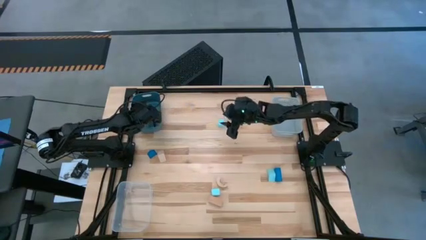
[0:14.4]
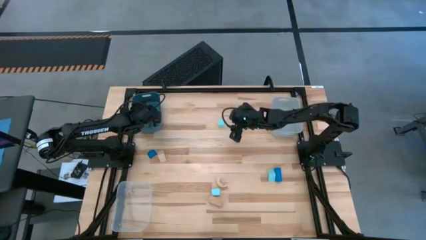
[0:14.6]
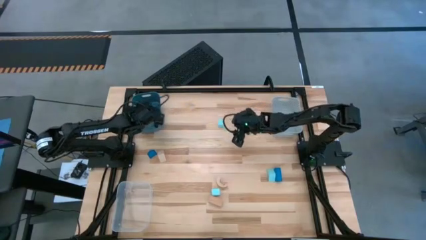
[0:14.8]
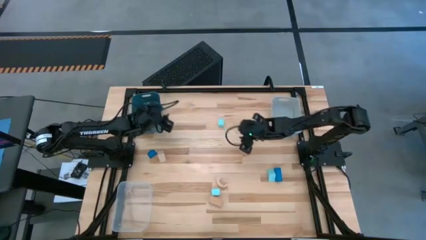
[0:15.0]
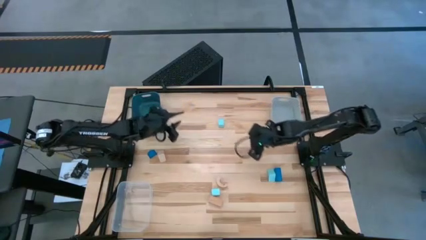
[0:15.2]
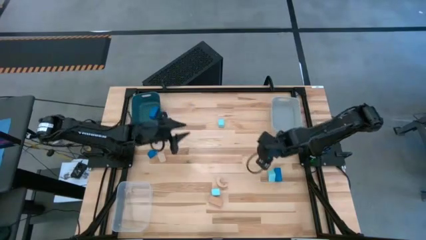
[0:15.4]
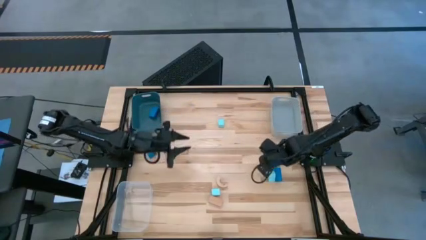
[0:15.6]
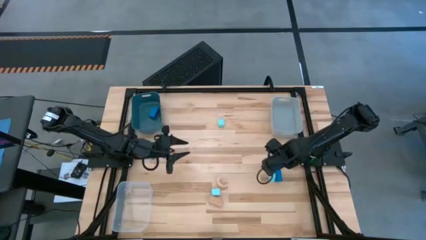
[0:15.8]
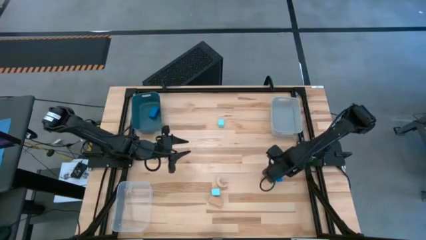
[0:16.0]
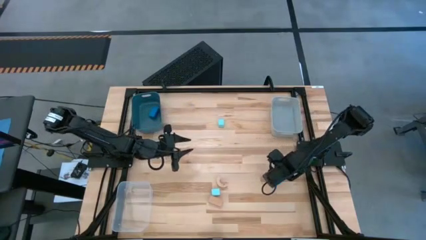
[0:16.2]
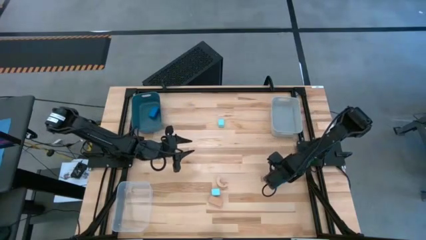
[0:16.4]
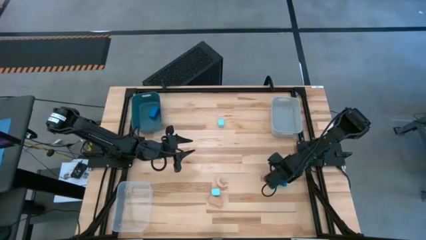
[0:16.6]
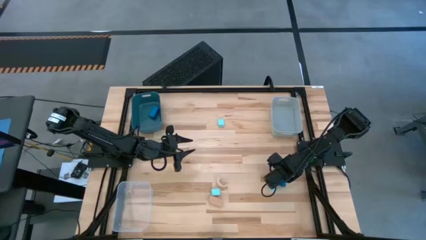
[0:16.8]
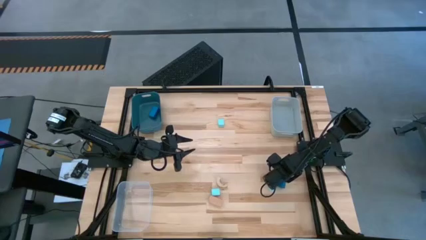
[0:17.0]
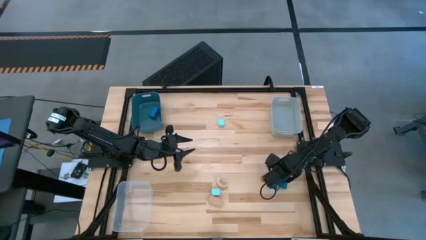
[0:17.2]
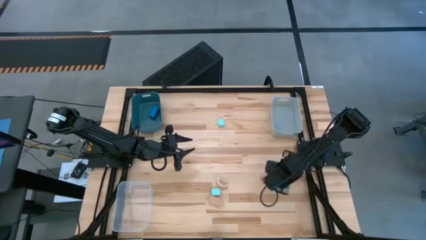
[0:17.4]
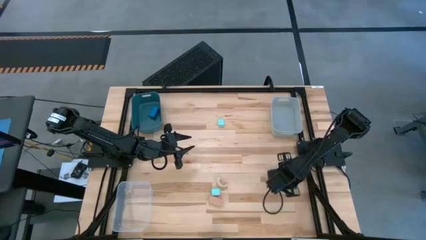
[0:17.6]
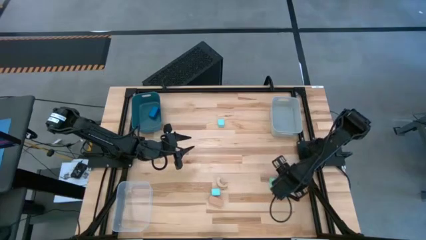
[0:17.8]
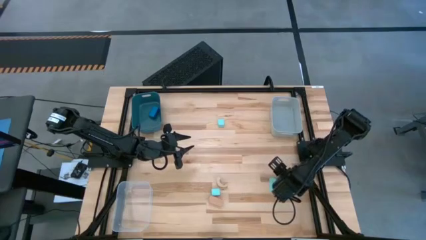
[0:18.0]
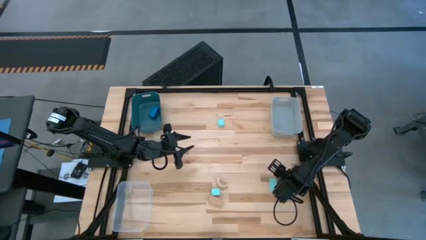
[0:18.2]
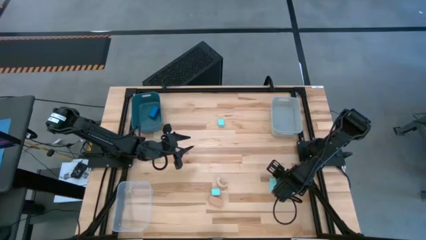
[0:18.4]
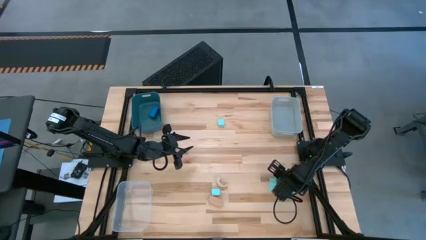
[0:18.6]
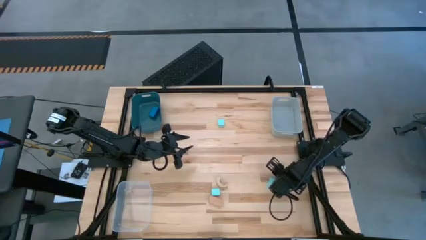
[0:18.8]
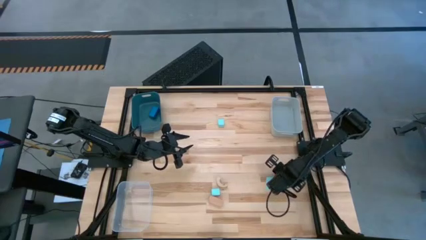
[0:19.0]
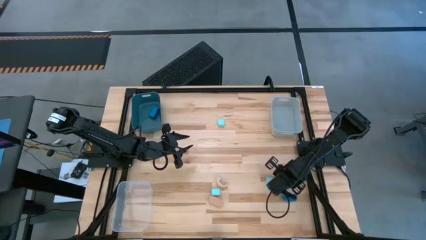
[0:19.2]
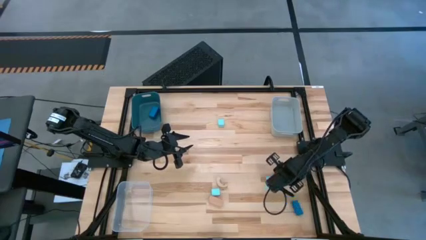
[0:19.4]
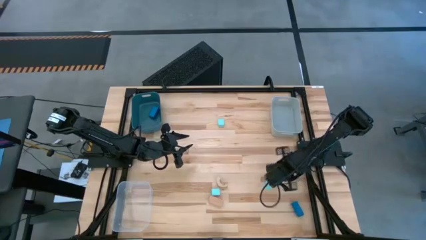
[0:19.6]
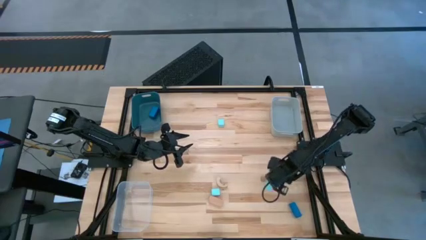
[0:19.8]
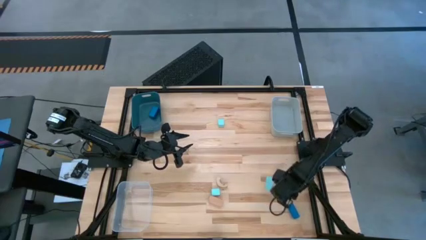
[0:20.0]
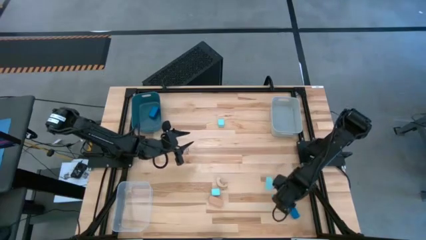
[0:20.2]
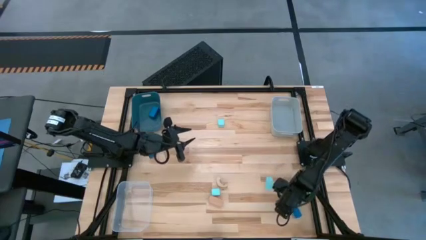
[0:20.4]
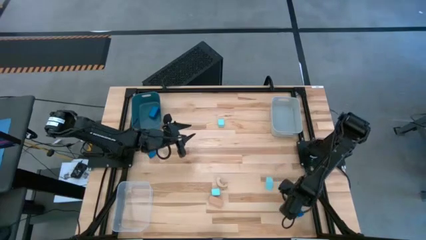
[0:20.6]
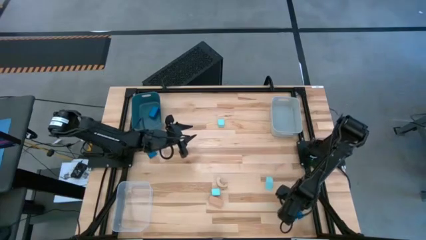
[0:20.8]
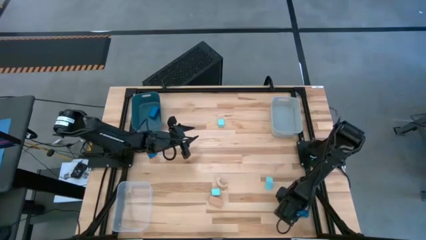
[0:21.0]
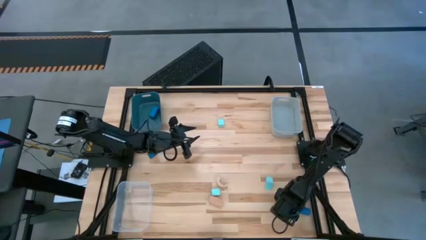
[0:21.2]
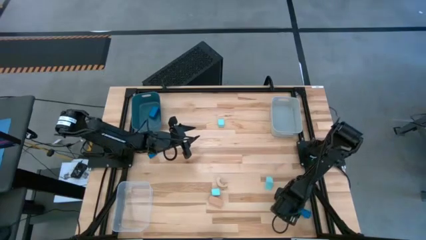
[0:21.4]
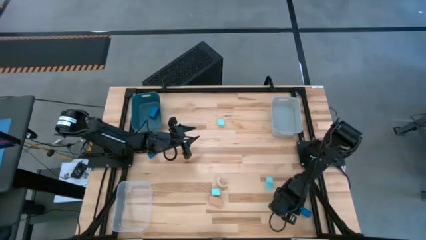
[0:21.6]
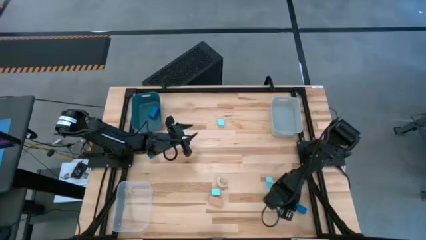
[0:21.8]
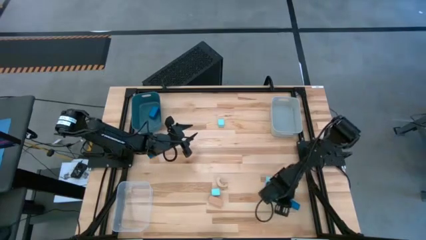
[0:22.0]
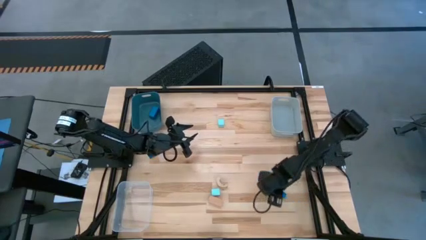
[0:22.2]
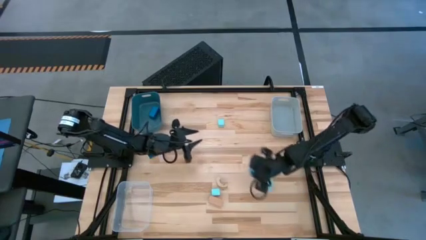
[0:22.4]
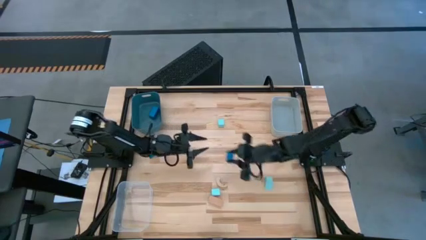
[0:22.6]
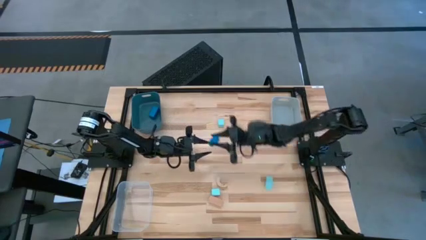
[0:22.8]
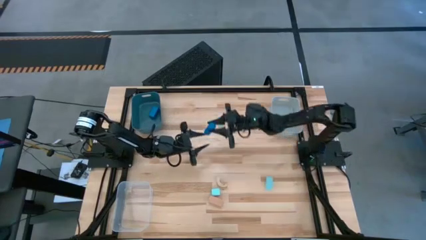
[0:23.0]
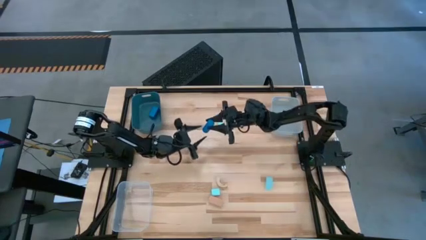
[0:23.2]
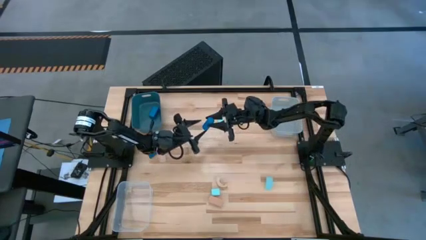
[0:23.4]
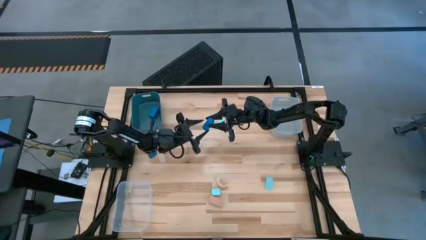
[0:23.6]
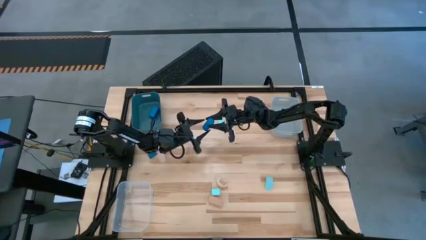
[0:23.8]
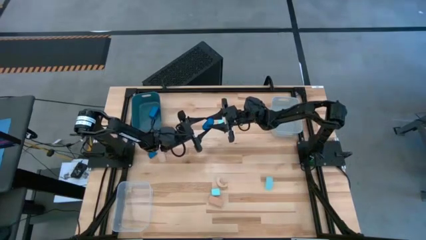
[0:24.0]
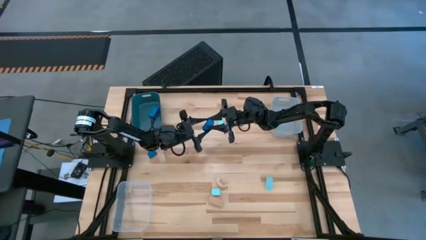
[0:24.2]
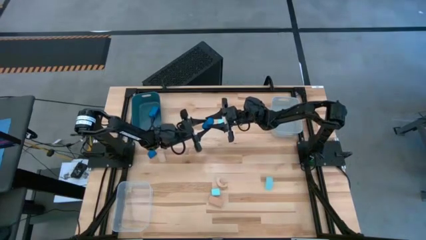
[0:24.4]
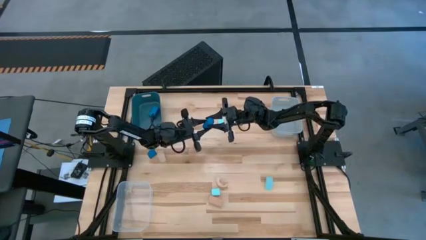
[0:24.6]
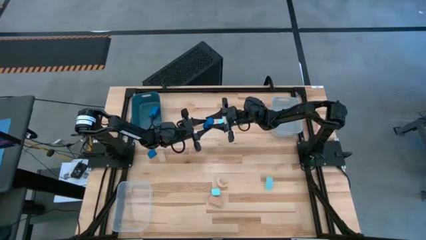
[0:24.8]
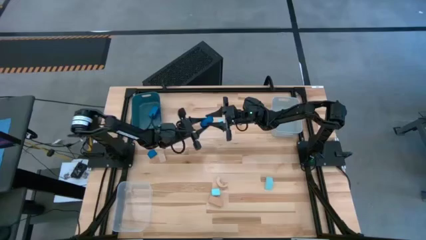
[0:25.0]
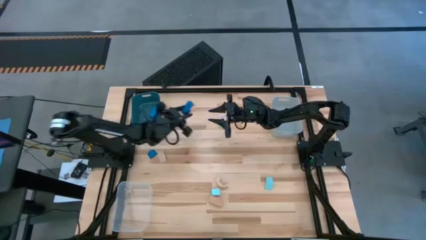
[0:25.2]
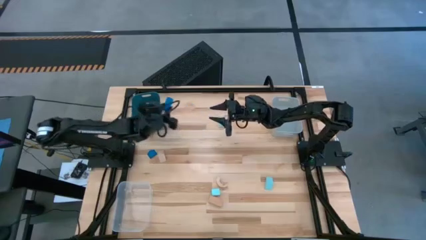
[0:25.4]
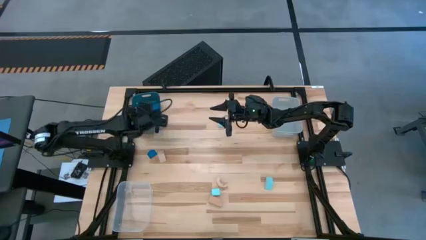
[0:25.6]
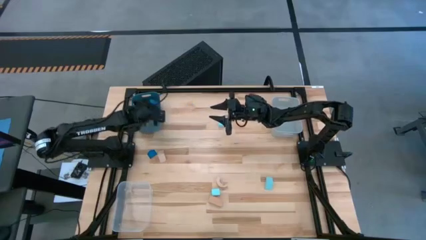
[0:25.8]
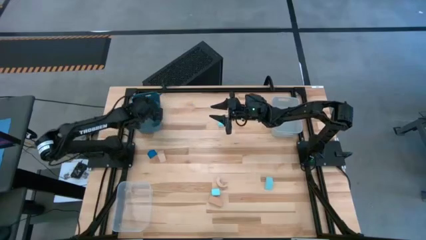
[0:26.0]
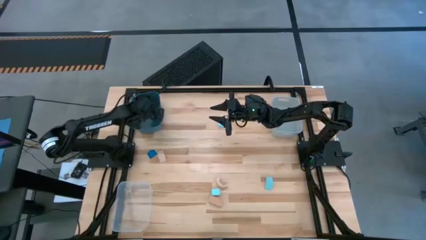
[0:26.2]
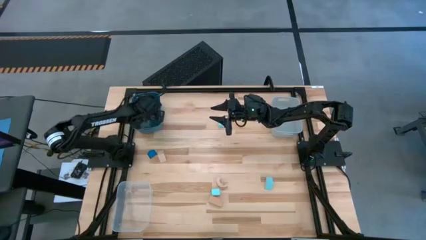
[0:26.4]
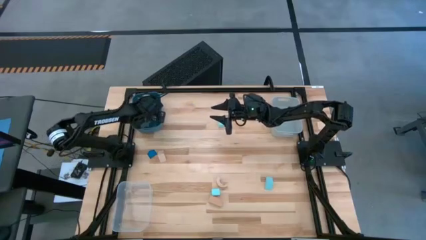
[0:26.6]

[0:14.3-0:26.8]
Task: Sort & place blocks by color
Put the right blue block into the blue bin

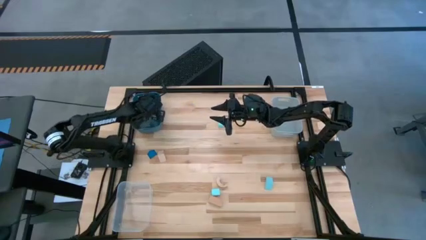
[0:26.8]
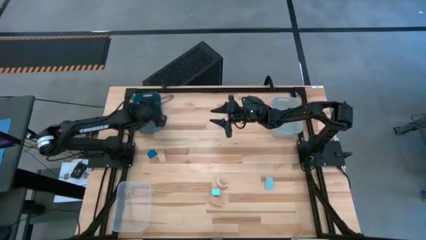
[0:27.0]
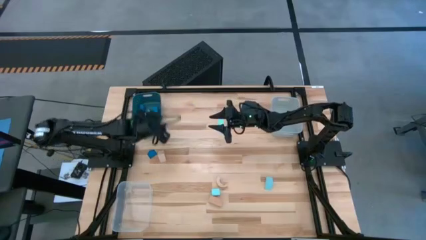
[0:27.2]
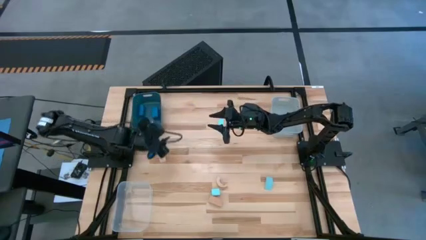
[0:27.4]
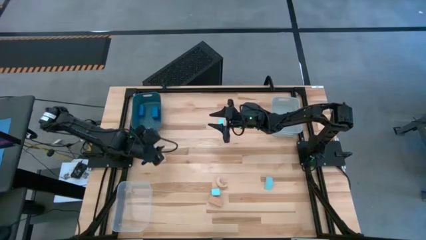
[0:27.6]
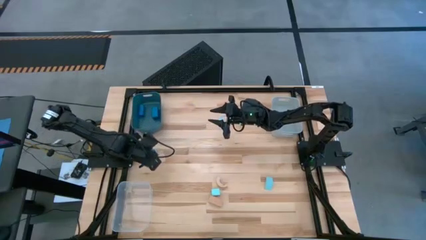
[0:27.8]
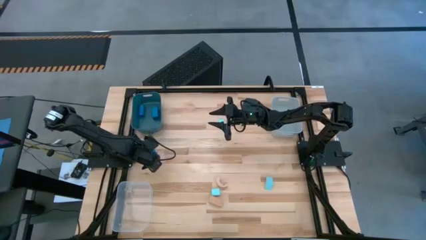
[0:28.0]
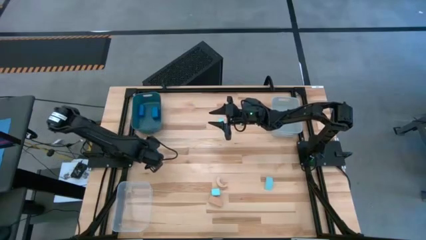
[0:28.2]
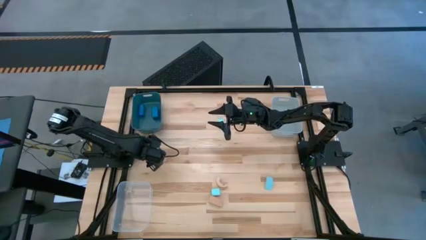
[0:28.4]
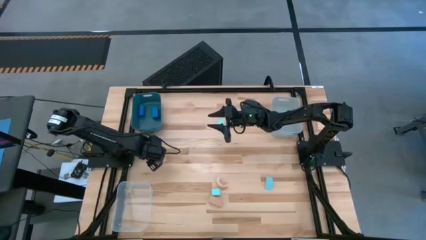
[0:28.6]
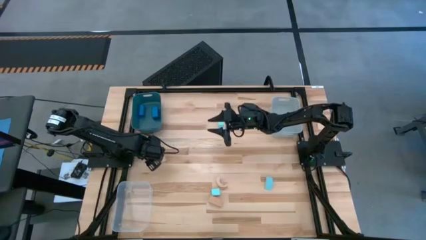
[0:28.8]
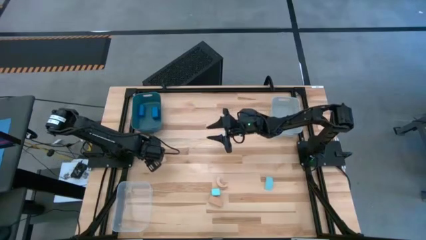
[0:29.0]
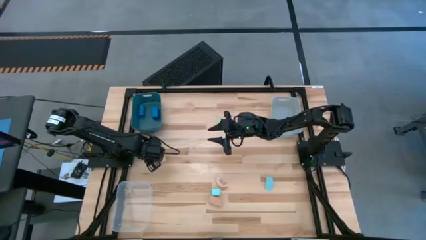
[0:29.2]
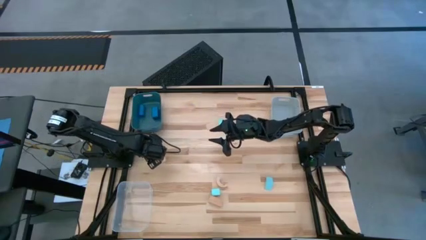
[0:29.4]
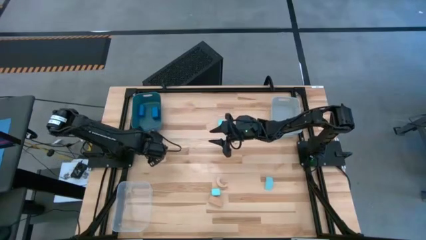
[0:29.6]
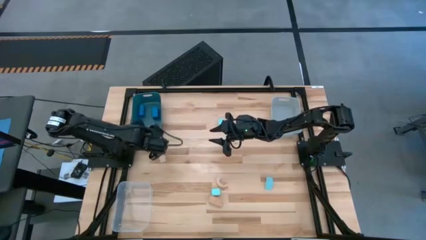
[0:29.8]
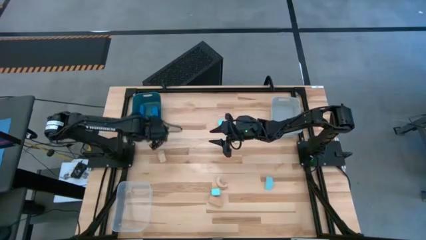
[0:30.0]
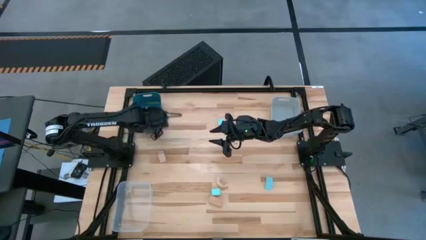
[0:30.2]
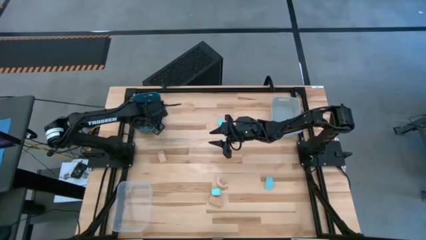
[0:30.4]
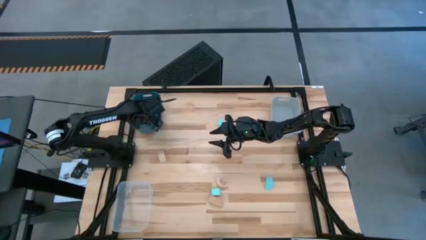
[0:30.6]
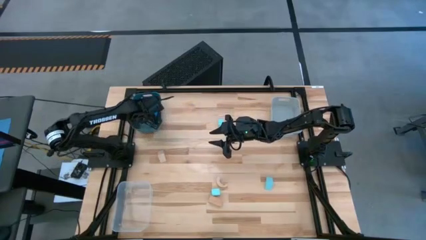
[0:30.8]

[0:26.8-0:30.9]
Put the blue block into the blue bin
